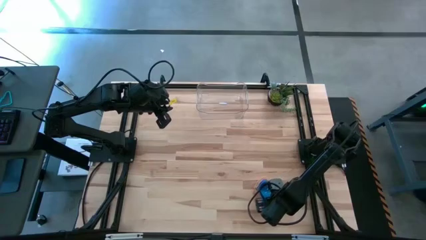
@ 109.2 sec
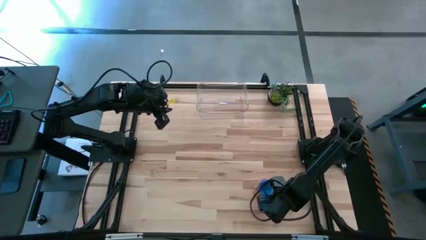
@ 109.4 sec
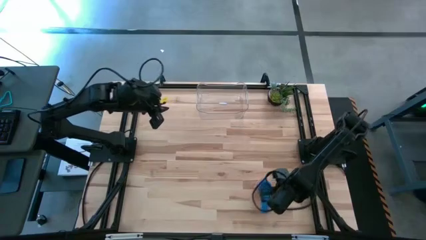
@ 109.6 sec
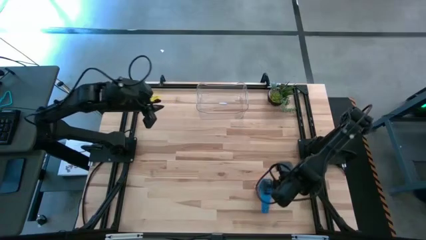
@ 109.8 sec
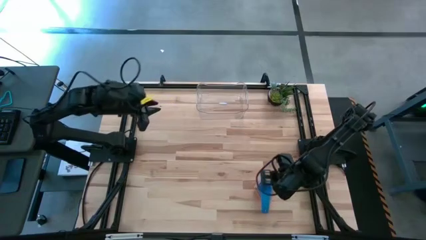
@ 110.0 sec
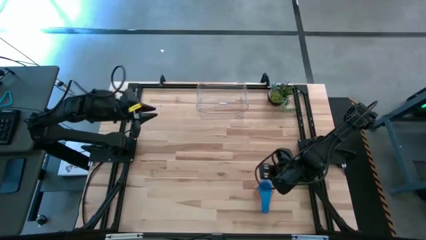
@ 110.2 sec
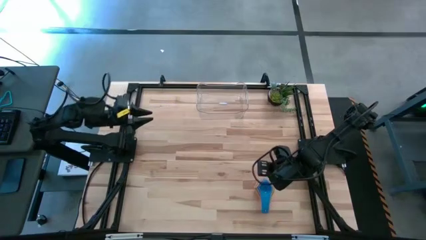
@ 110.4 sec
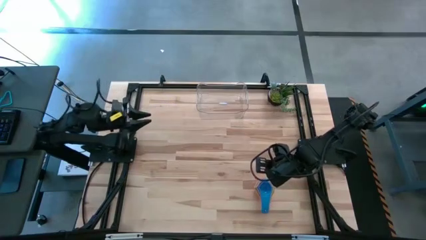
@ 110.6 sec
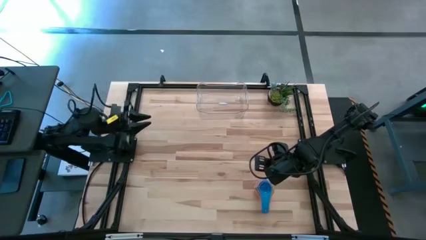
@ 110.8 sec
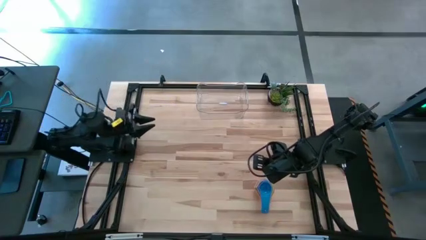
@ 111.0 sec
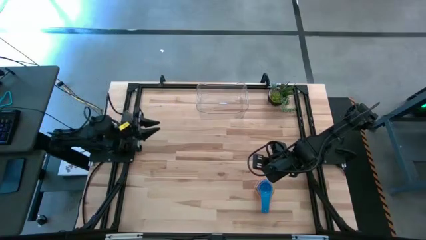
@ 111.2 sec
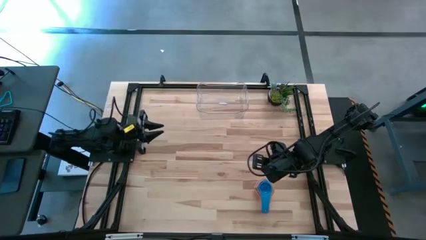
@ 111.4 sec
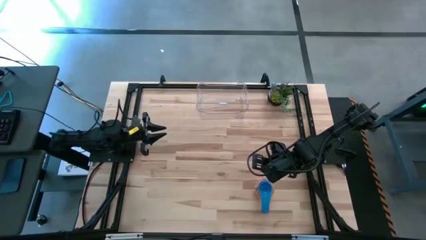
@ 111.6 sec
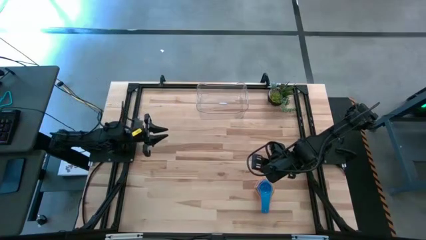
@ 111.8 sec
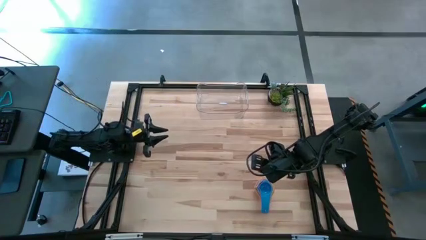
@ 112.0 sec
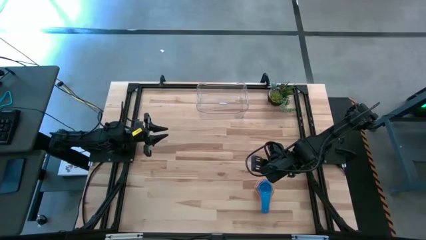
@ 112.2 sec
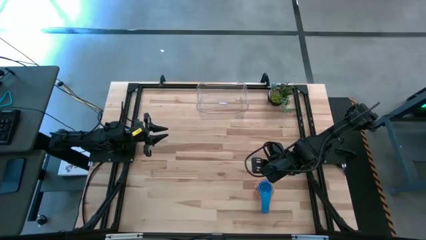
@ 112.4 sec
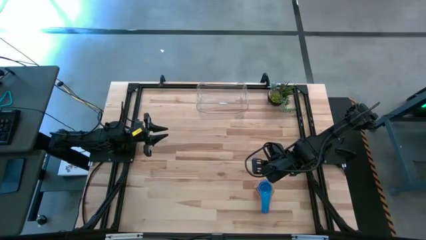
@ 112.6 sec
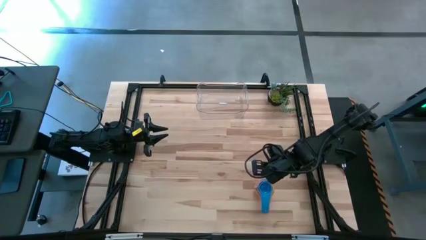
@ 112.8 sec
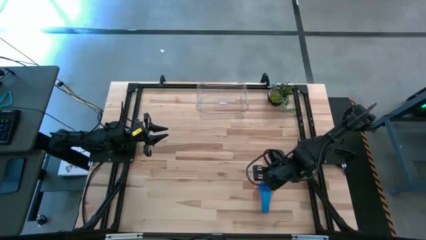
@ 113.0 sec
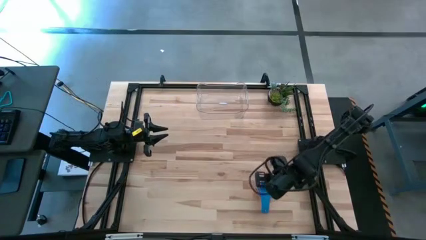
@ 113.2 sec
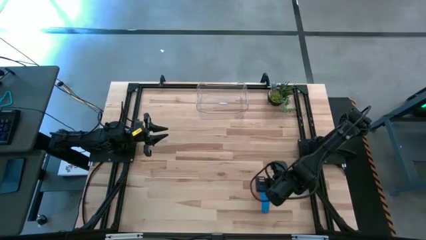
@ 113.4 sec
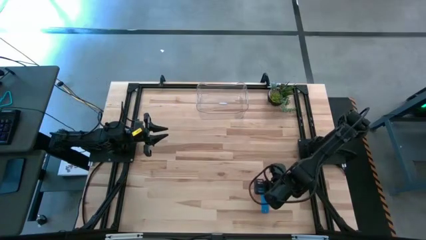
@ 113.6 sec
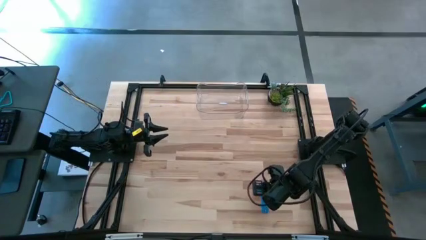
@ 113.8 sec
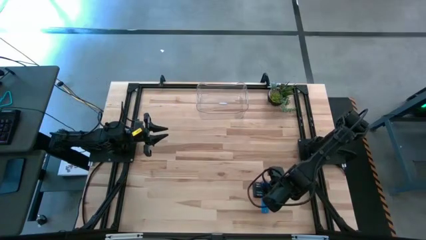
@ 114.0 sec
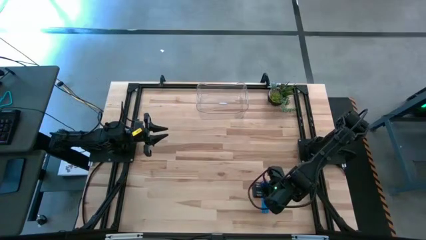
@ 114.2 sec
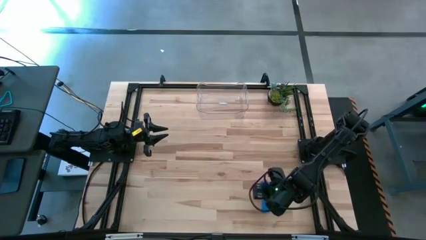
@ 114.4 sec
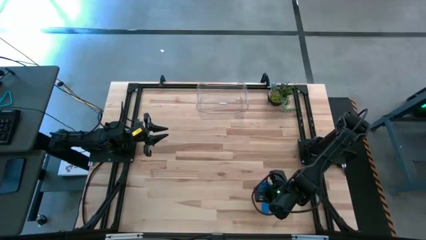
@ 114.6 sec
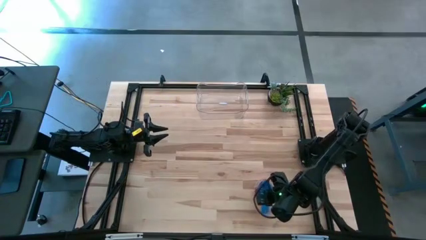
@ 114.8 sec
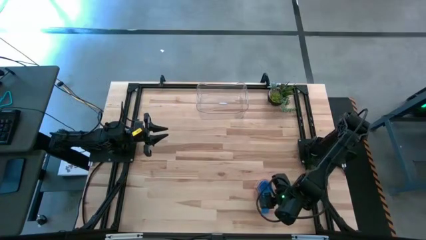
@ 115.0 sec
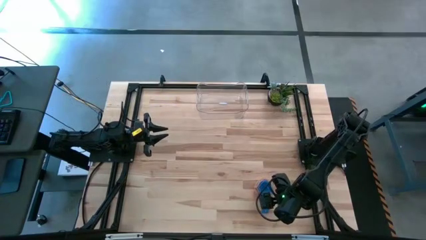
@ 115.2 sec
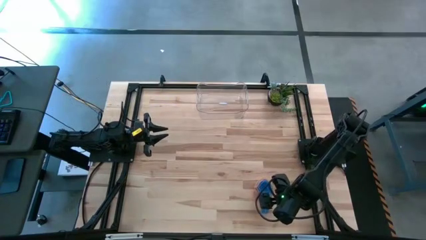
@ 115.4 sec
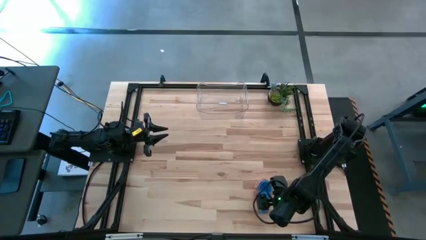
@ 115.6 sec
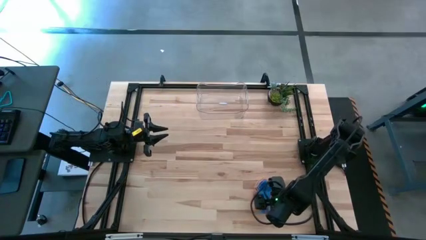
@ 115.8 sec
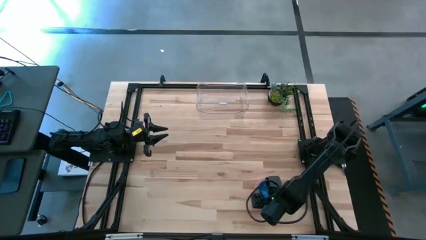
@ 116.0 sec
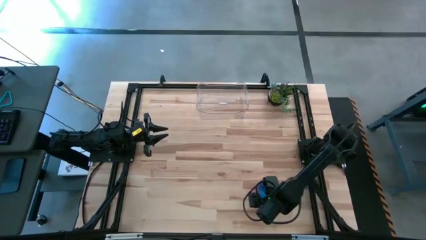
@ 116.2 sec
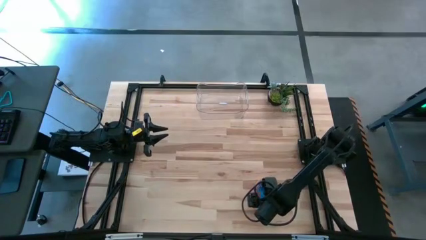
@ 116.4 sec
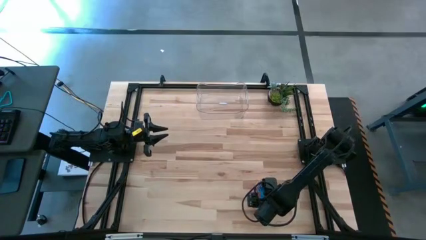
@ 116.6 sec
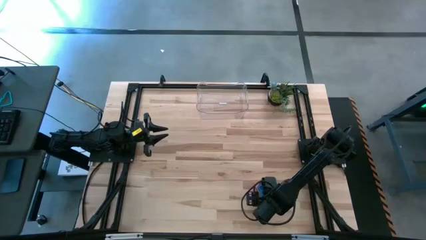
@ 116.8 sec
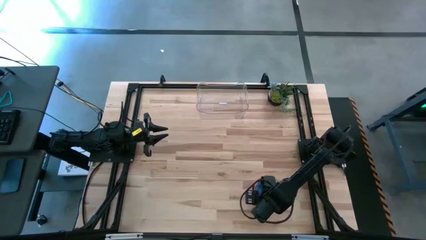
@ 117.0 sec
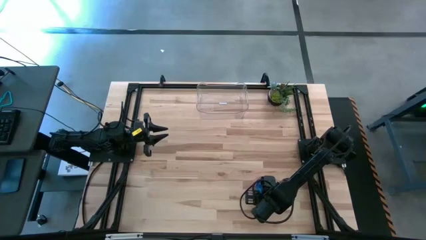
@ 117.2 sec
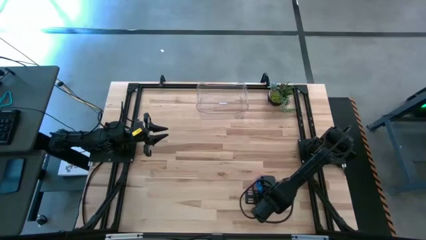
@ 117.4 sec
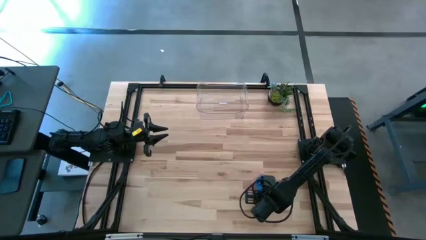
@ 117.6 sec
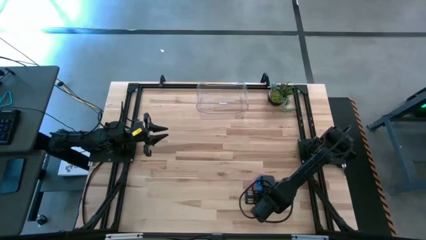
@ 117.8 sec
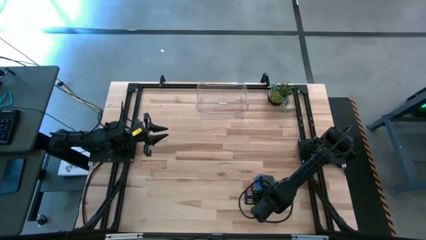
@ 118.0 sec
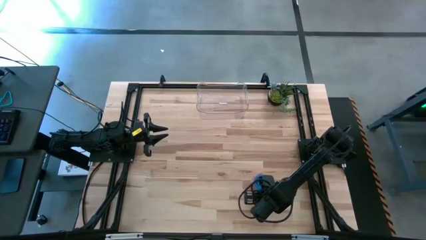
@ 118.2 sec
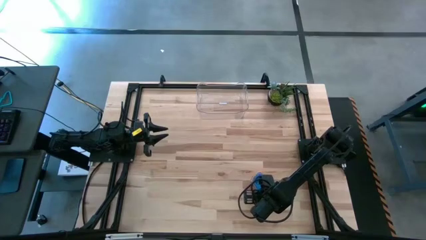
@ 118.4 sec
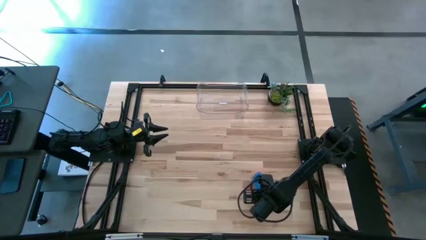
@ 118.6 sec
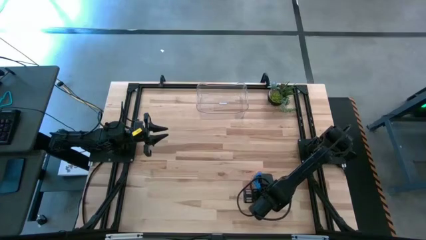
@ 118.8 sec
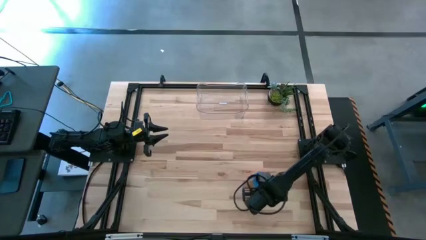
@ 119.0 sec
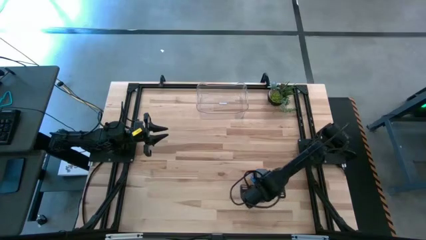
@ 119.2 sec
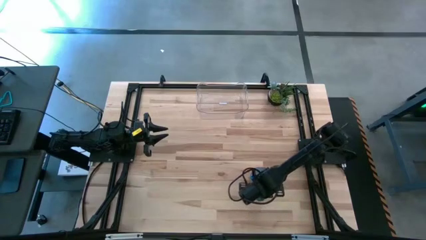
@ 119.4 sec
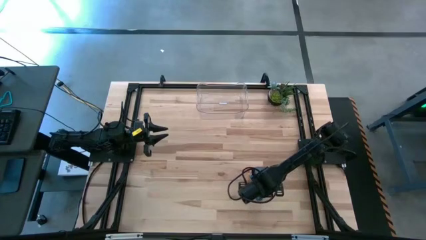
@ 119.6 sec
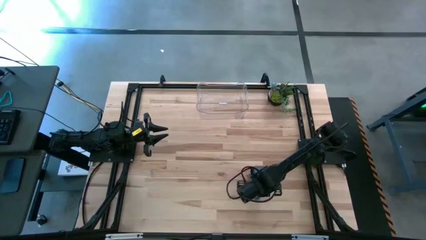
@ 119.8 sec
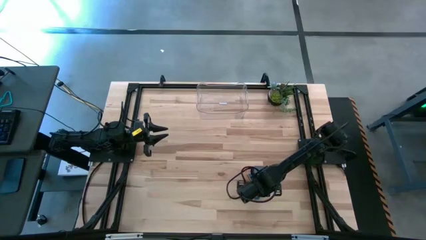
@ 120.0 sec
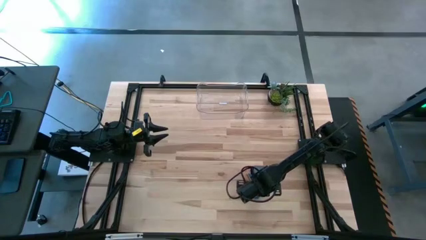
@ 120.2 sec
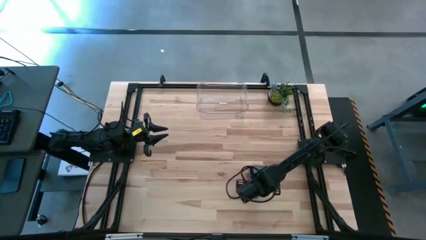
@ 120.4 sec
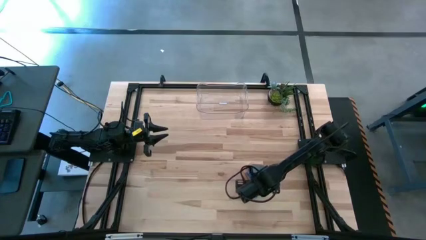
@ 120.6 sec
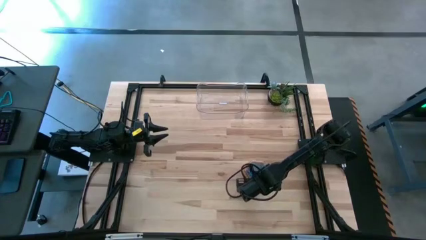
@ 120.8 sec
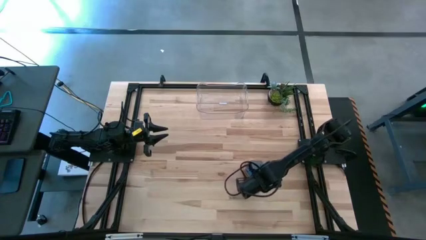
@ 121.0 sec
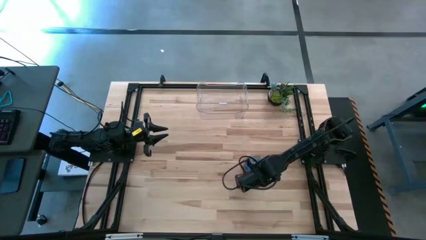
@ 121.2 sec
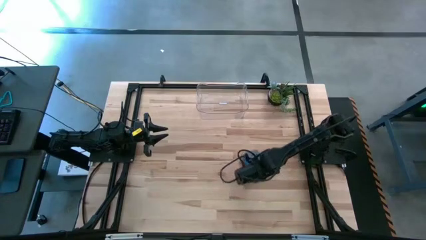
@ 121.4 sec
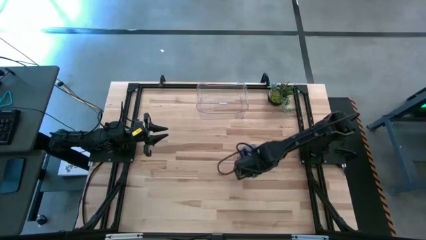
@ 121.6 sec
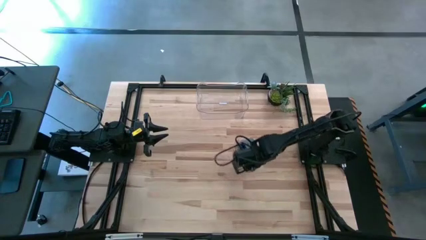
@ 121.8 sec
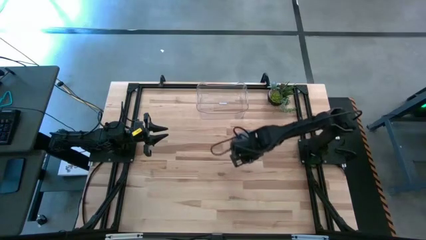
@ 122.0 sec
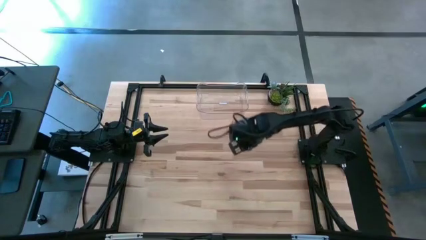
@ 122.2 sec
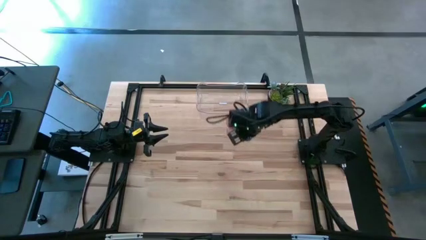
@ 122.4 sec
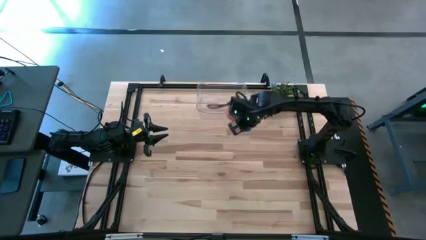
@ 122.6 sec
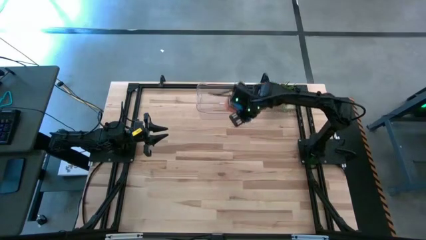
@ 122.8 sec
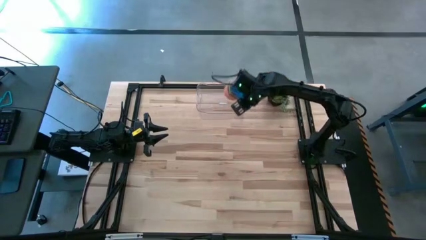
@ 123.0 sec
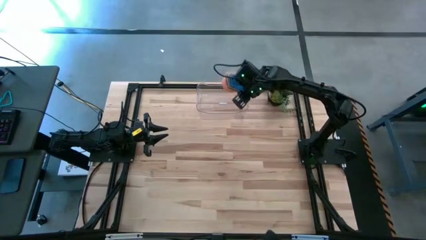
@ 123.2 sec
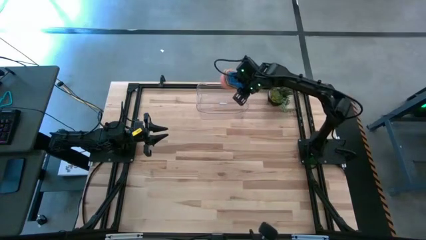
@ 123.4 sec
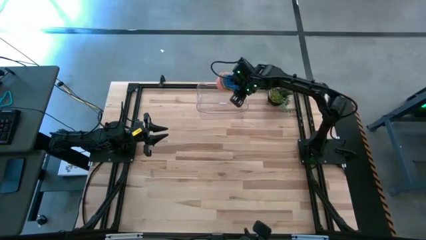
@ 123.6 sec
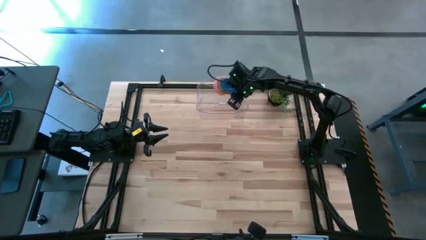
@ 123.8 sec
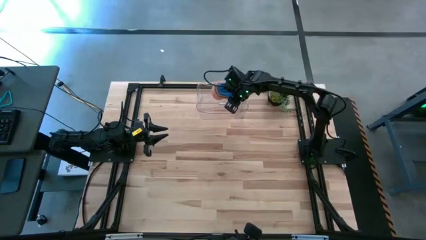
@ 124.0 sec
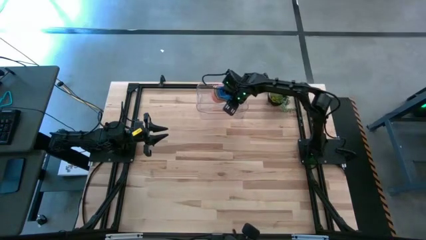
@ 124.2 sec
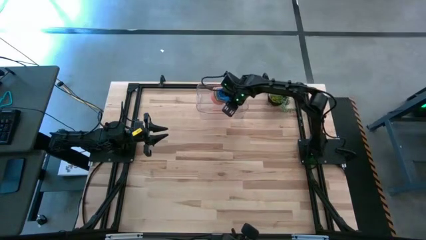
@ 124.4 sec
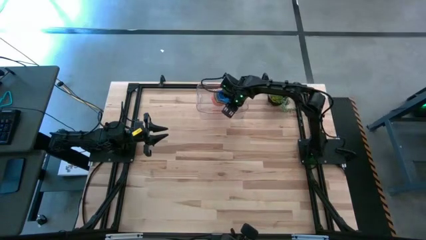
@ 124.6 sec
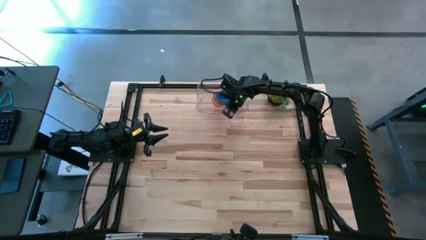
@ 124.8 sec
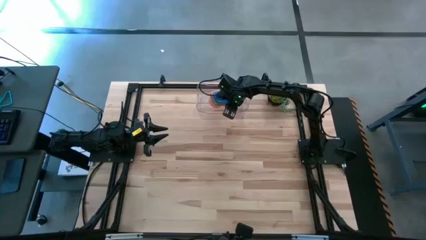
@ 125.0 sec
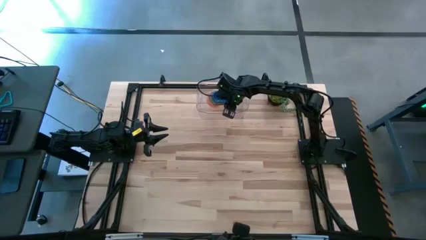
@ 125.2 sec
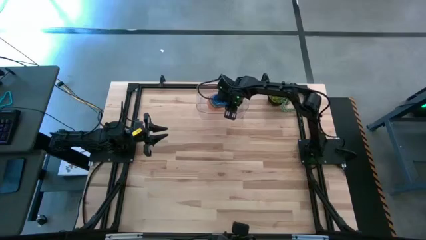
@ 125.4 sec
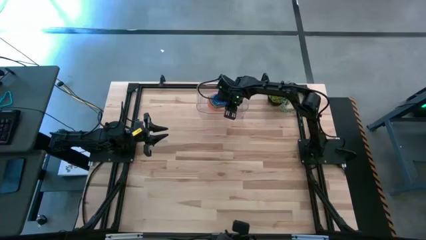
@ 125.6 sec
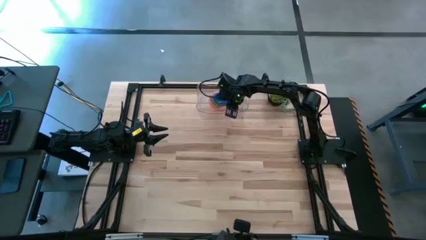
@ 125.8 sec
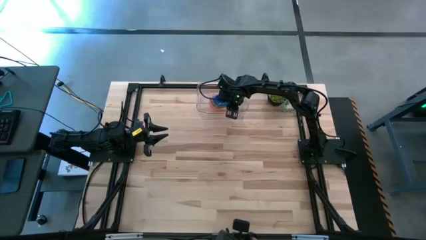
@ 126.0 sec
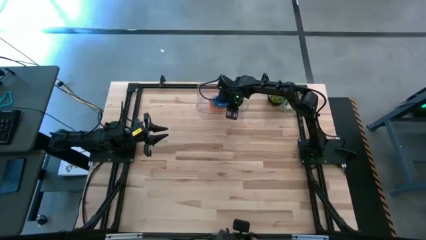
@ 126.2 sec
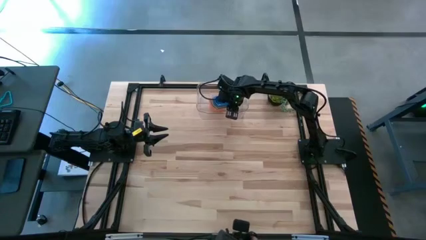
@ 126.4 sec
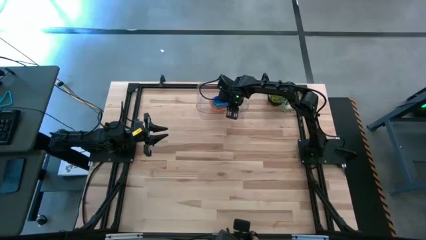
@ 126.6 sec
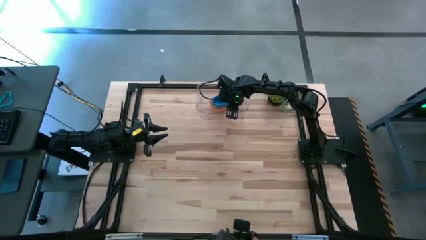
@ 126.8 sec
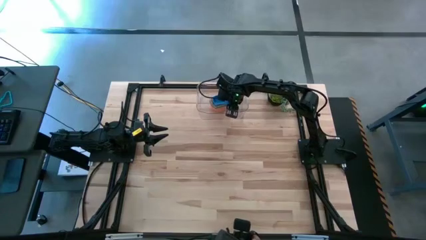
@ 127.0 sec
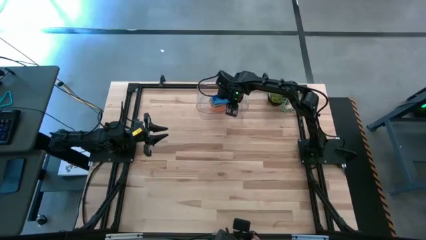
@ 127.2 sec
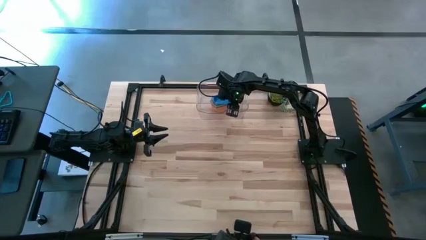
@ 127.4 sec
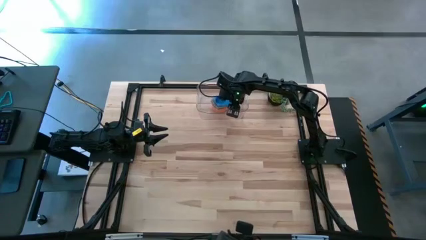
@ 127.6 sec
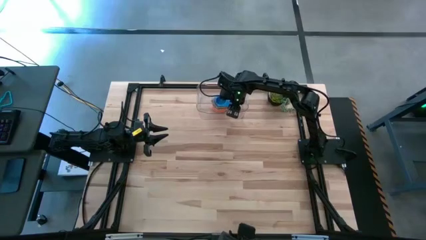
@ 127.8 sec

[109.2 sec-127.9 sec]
Task: Nest measuring cups in basket
Put the stacked measuring cups into the transparent bin
